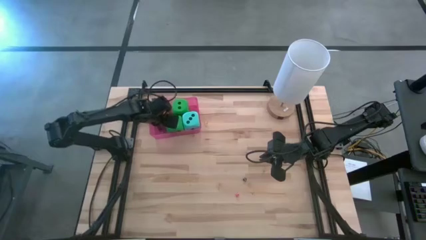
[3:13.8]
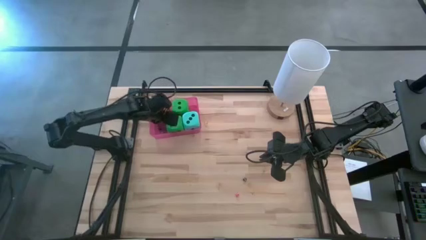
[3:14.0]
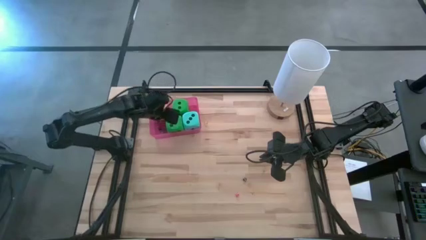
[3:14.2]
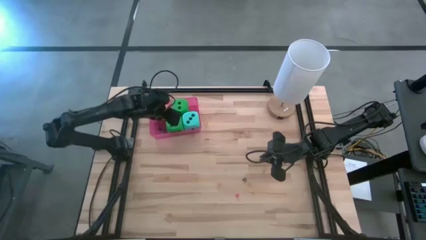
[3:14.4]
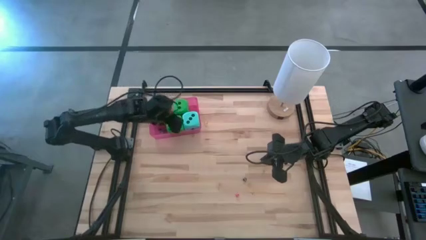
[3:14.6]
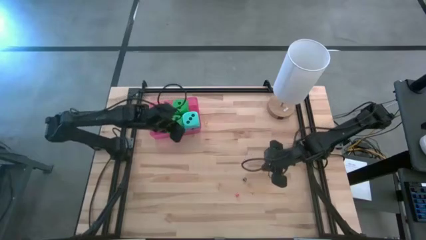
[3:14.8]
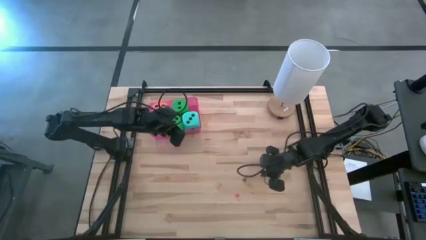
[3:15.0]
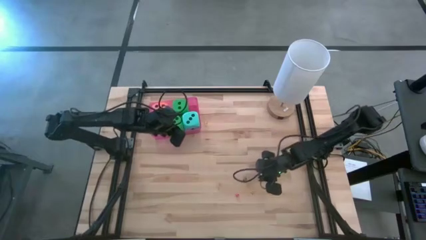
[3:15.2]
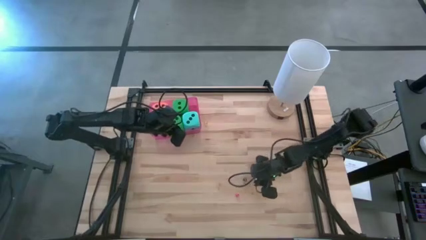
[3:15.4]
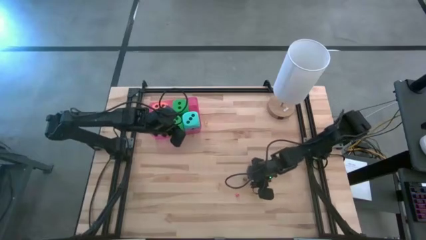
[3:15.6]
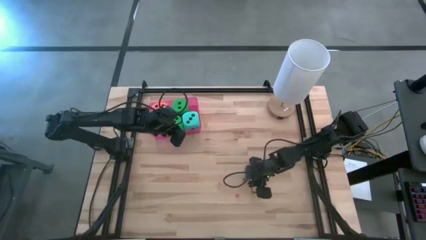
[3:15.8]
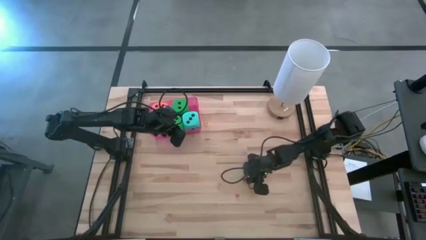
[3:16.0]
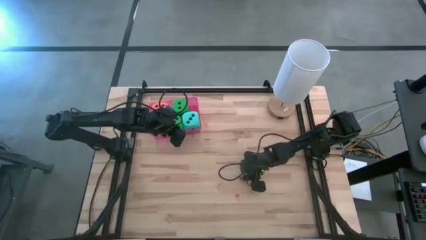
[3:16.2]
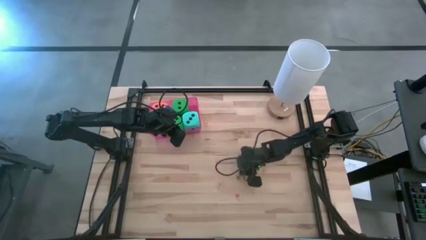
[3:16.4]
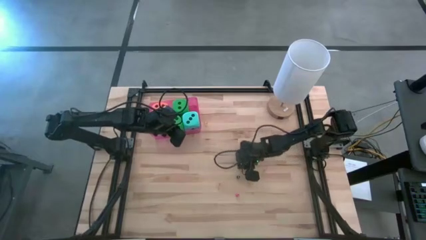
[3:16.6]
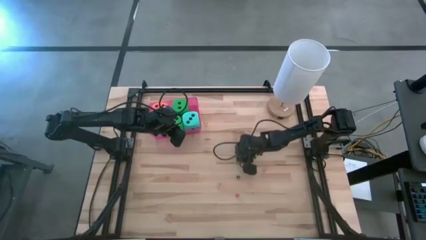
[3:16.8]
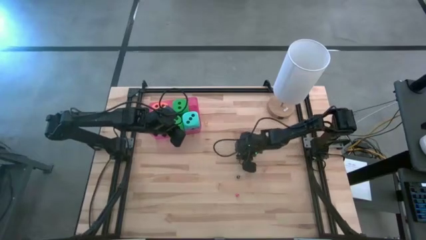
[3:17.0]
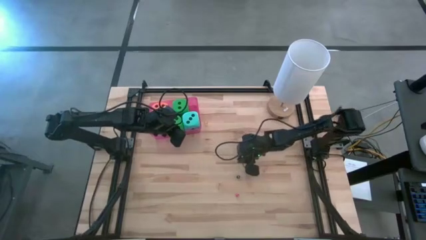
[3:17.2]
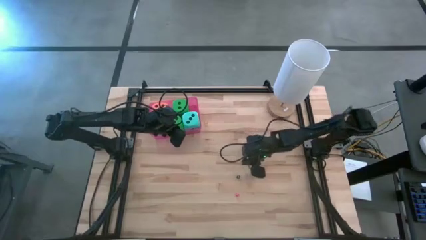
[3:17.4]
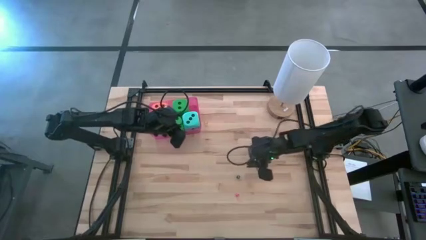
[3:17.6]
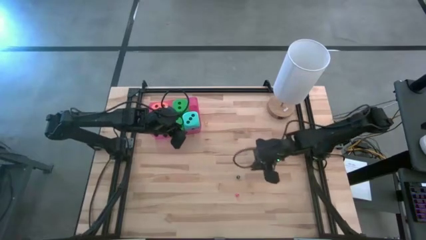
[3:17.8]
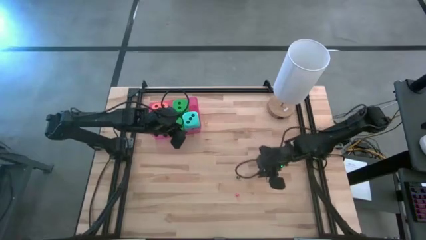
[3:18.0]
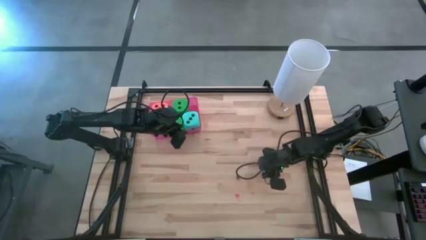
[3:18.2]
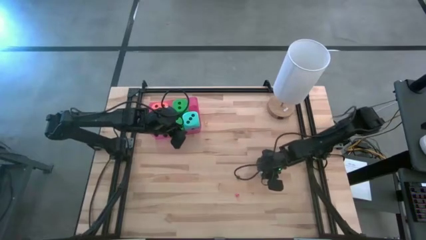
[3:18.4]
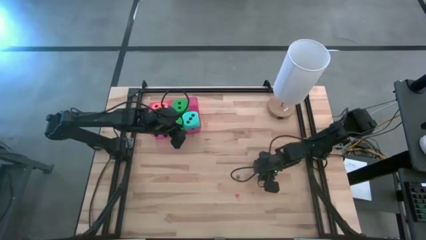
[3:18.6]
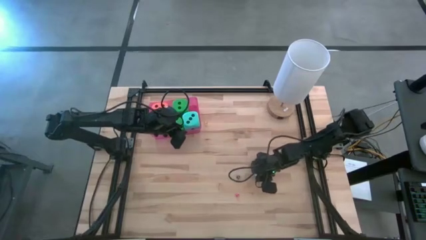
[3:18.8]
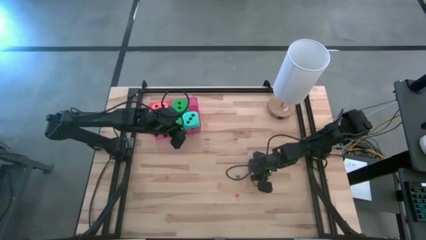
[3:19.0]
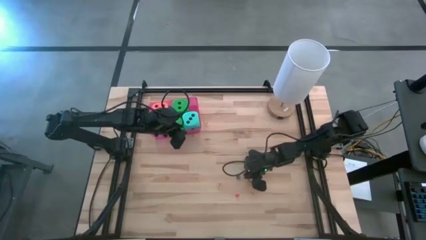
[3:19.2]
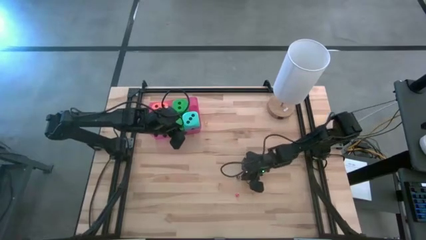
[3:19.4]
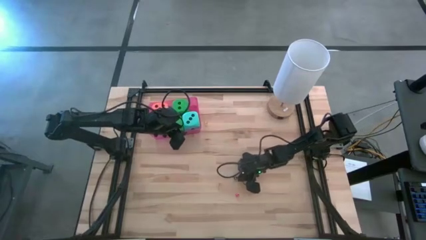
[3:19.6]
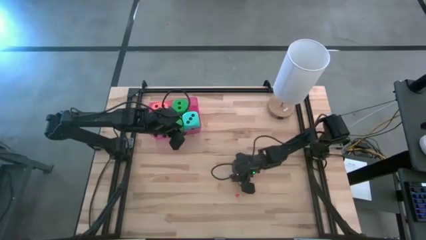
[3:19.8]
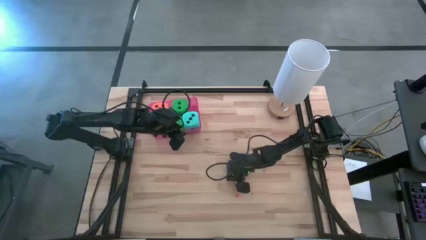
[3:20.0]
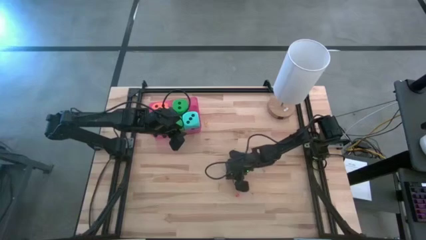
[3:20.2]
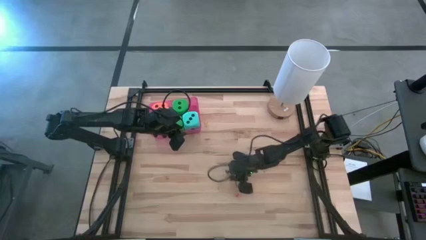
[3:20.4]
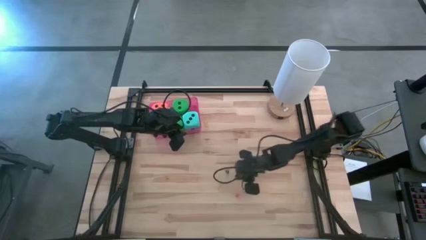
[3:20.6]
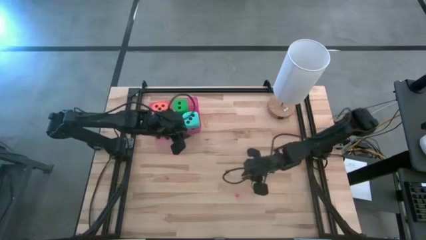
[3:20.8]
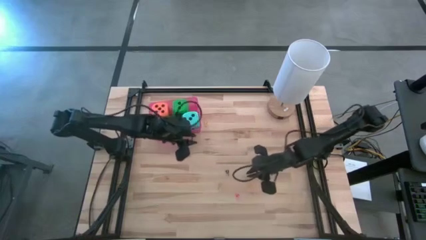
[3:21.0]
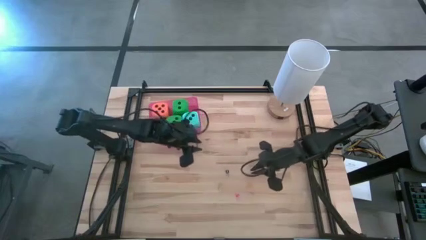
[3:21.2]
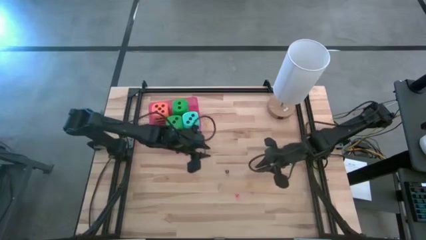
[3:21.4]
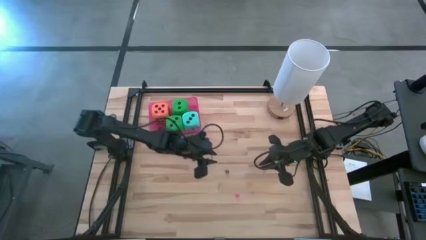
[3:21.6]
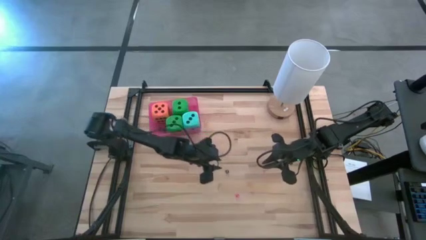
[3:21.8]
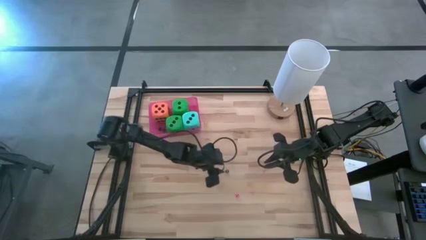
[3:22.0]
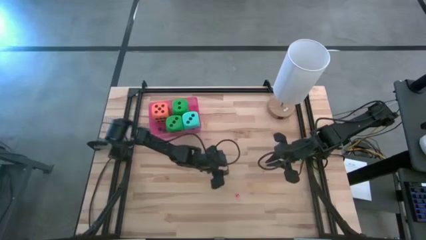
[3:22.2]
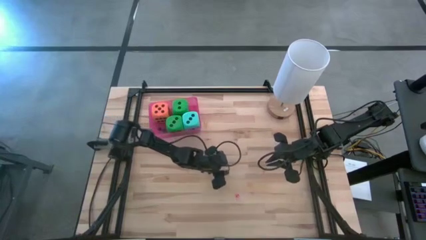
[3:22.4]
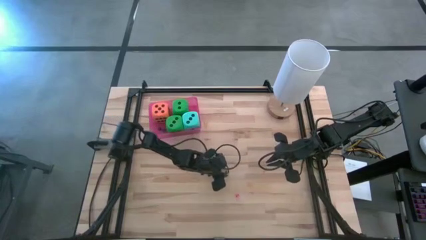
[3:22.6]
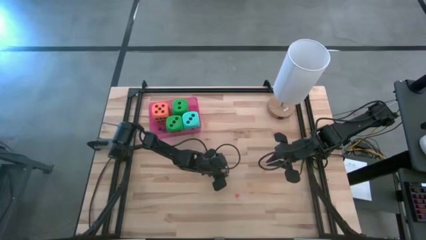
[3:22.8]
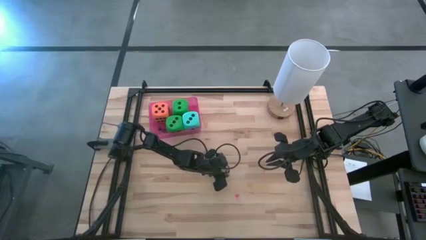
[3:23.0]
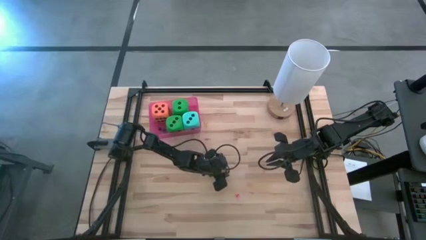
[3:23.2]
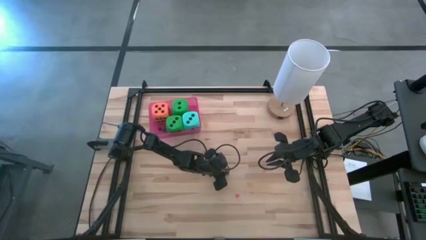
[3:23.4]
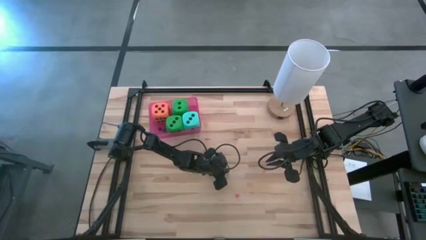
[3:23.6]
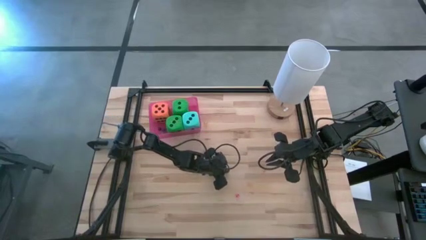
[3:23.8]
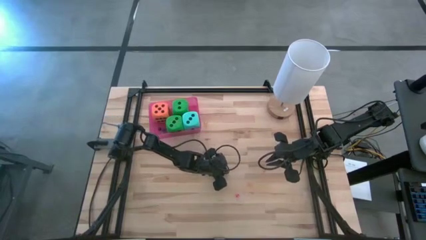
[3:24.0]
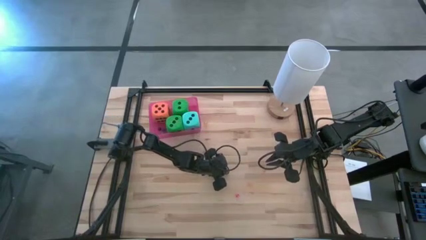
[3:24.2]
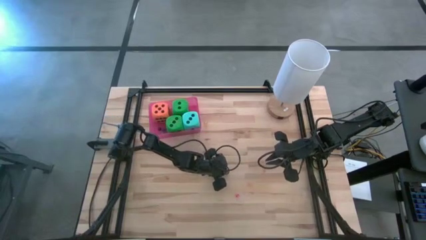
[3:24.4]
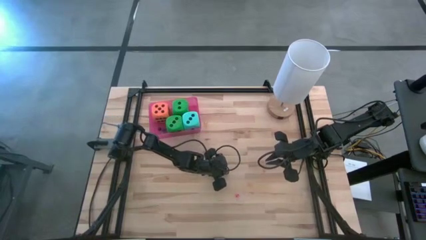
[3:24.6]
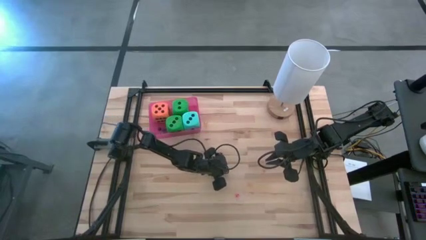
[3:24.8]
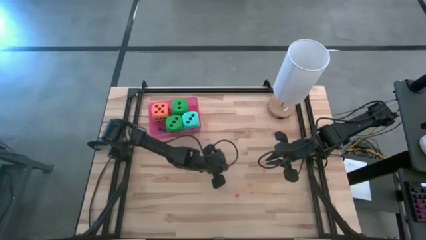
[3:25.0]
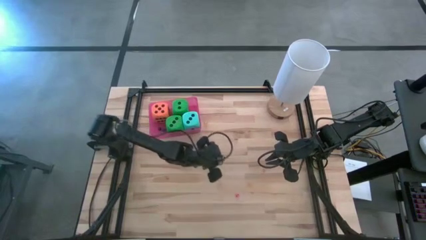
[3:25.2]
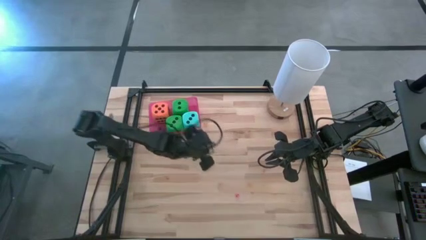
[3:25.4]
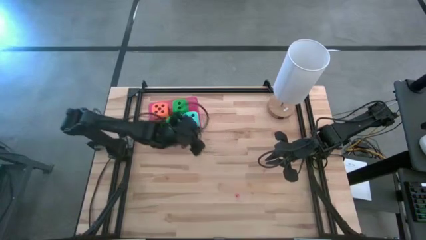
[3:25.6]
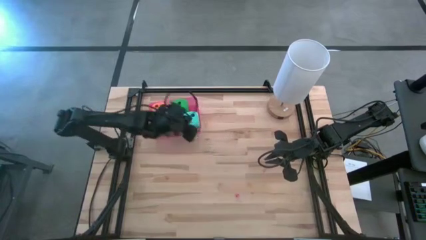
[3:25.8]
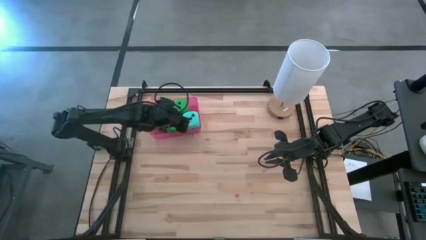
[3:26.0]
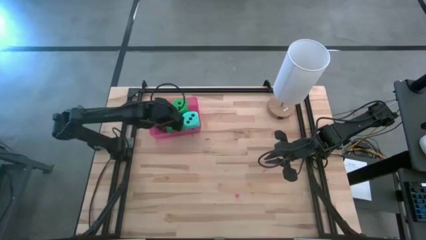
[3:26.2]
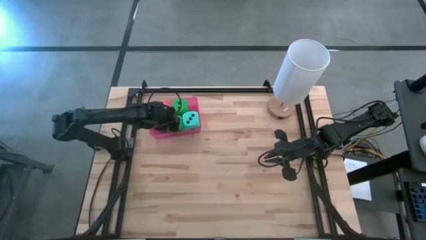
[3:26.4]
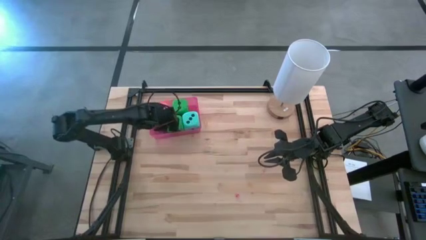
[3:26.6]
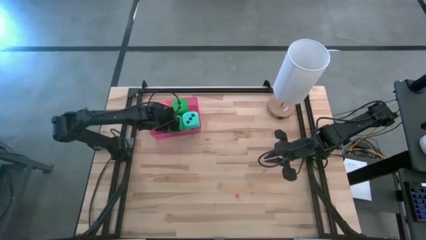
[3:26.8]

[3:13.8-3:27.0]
Task: Pick & Place Dice
Put the small black dice into the red bin

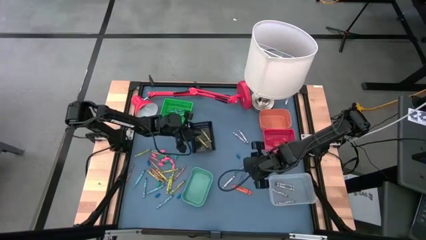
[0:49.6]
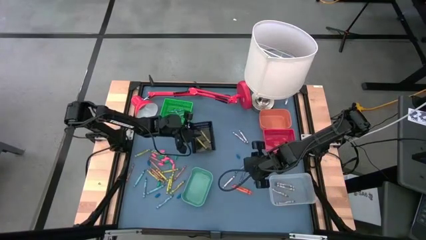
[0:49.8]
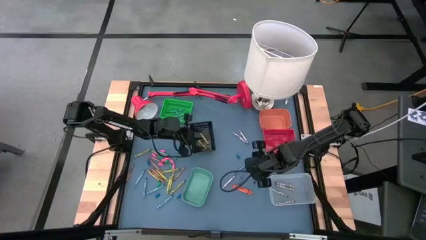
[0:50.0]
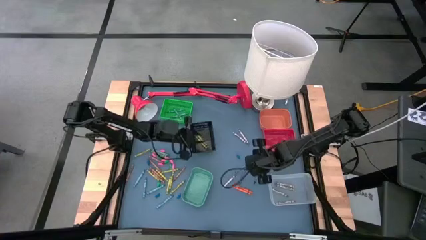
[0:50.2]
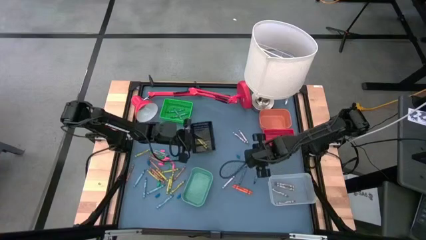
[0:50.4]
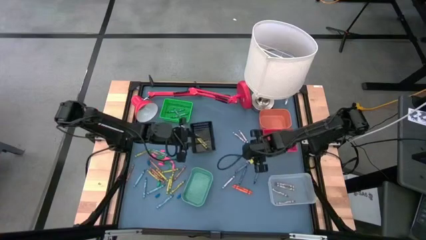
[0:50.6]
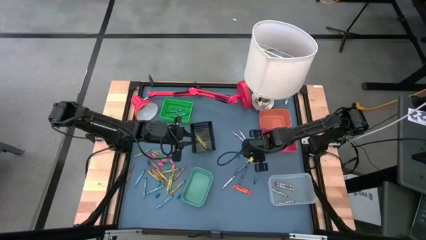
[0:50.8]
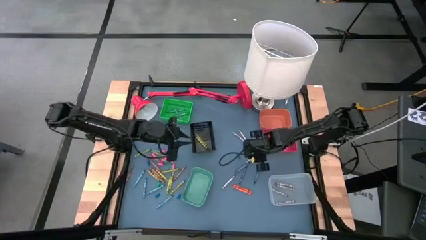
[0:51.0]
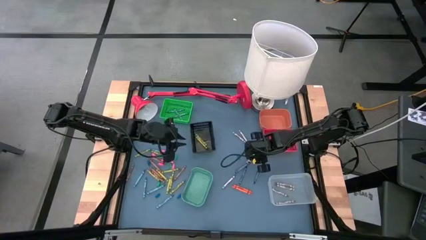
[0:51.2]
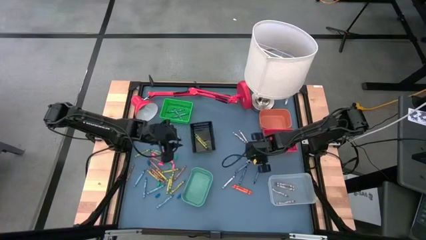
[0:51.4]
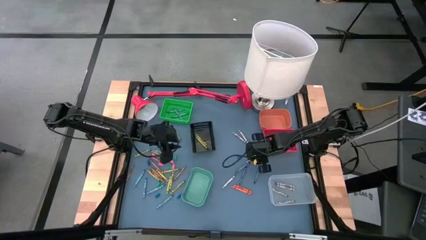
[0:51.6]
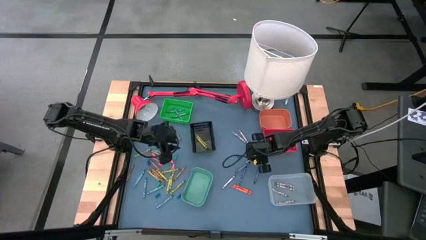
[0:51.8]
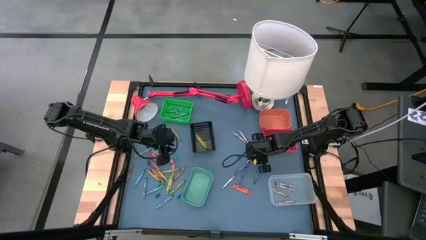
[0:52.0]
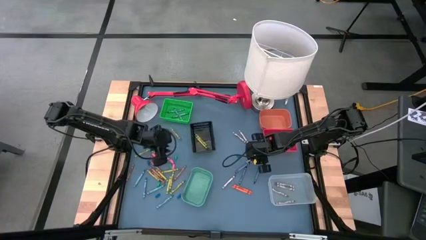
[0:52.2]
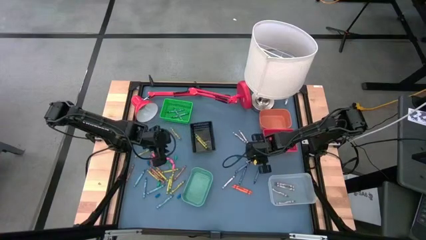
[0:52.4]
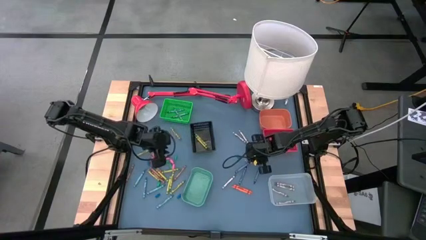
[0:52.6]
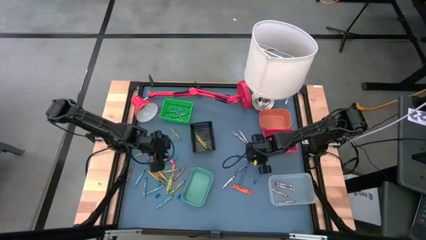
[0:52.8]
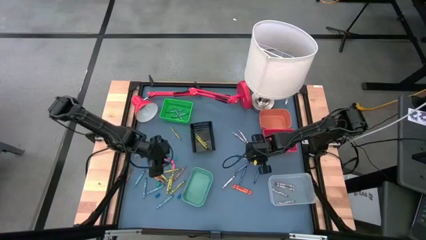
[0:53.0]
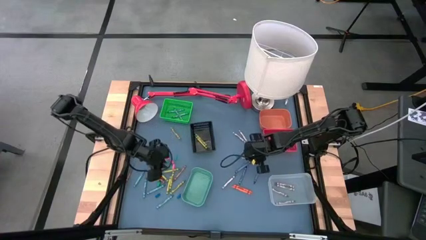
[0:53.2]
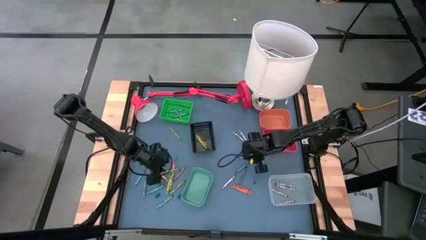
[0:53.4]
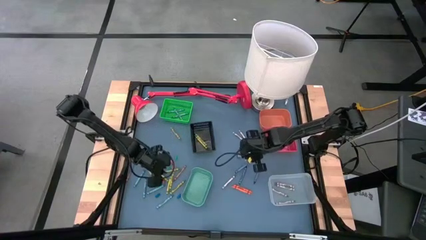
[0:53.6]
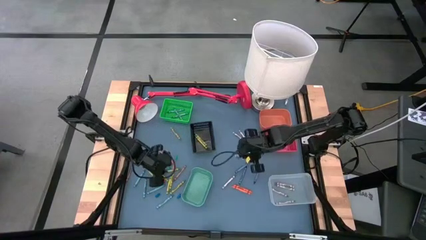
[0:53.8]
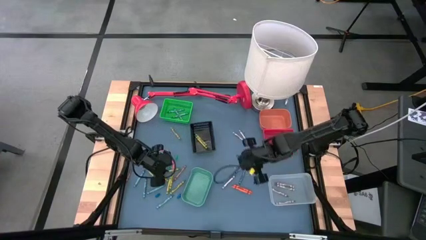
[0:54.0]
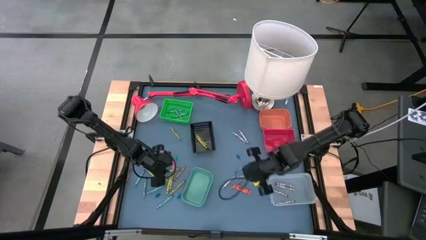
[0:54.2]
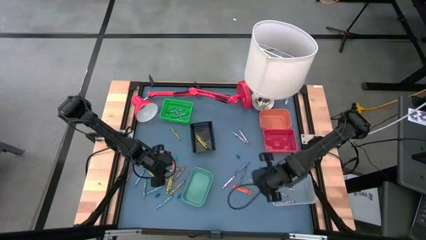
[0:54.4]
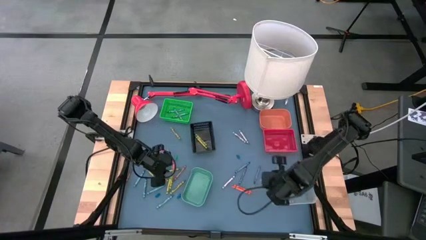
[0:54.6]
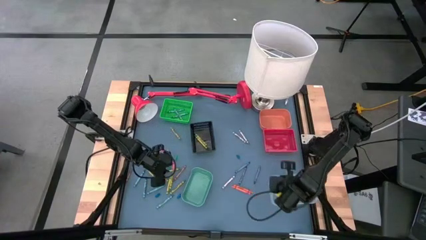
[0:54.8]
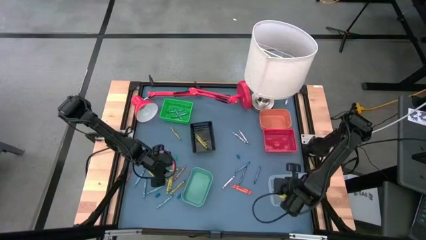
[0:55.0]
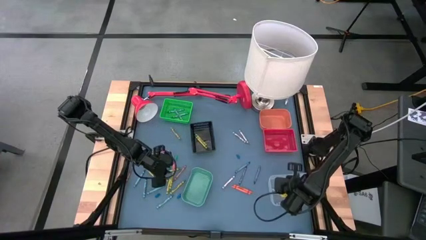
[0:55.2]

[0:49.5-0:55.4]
Task: Sort crayons
Put the gray crayon into the white bin
